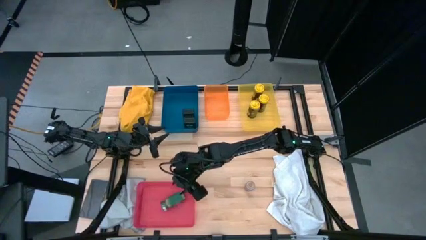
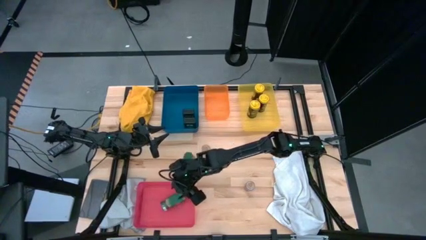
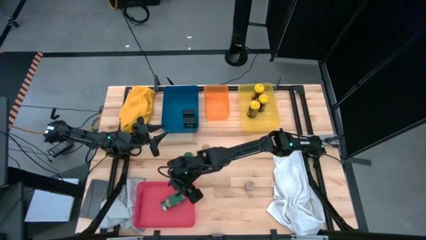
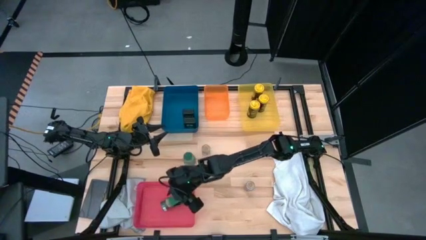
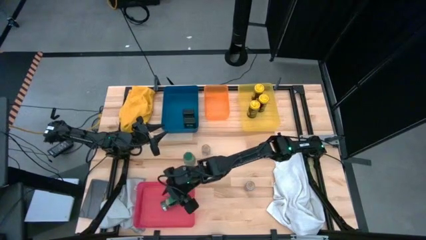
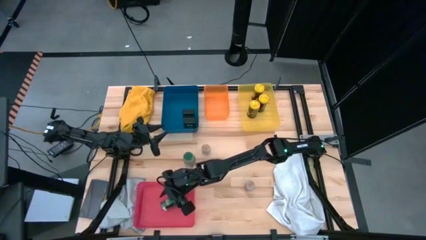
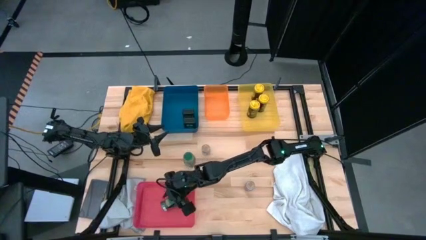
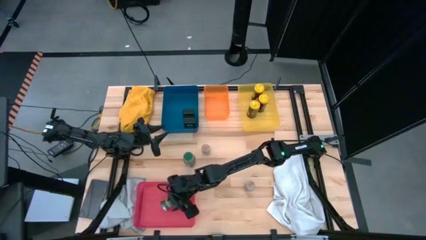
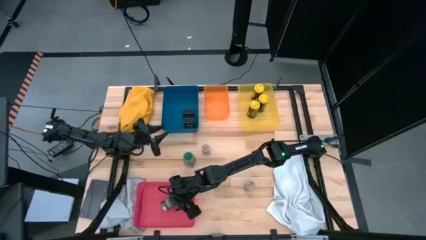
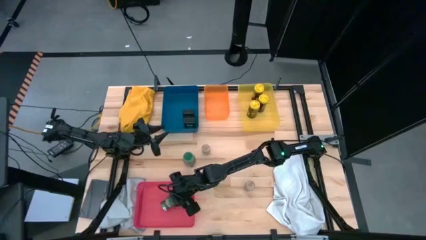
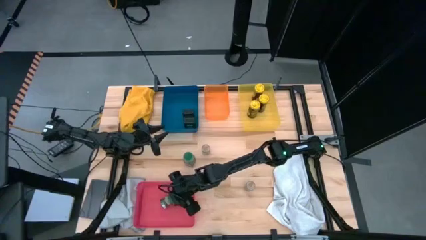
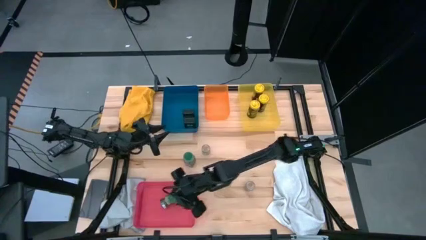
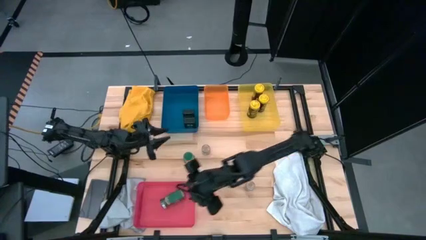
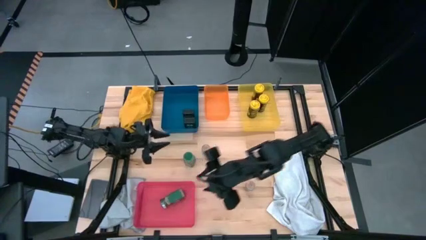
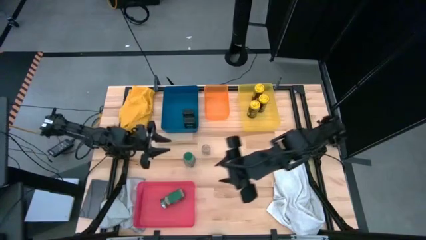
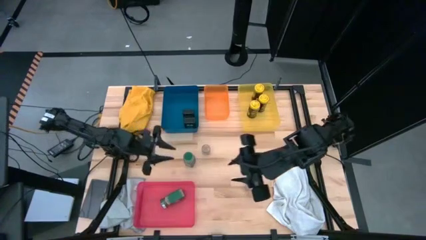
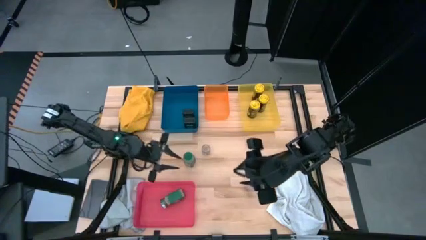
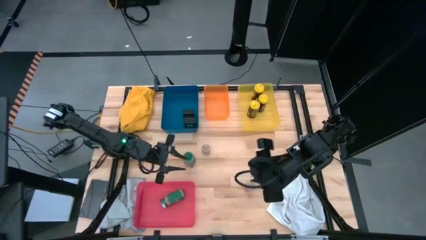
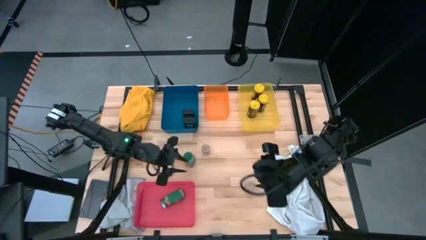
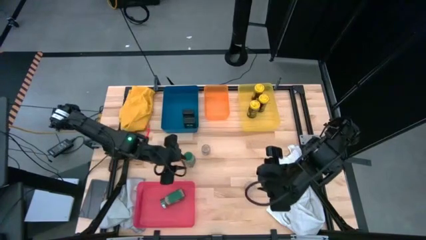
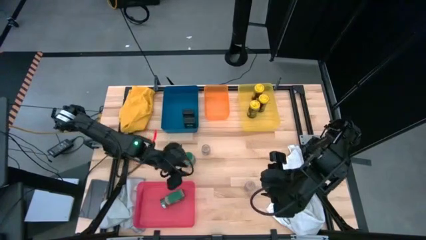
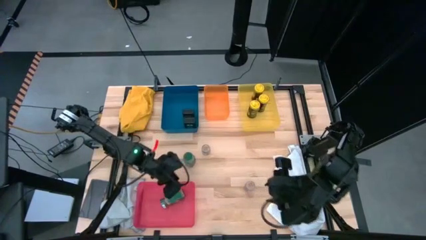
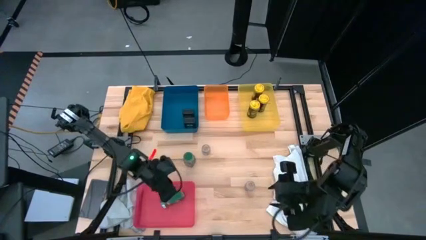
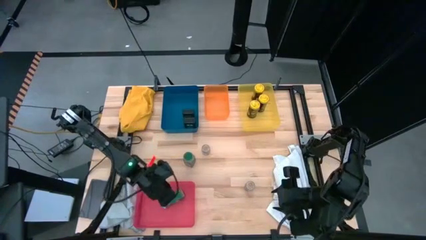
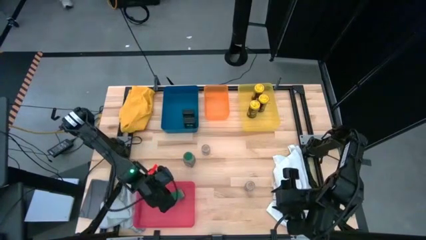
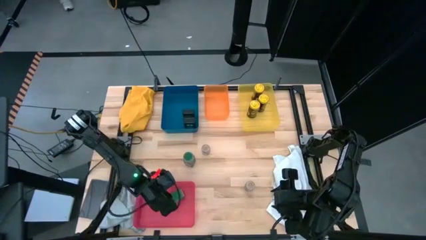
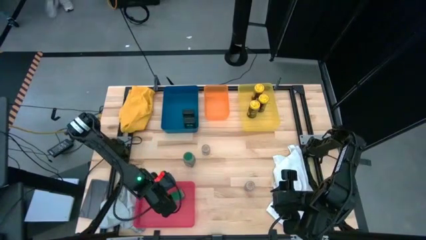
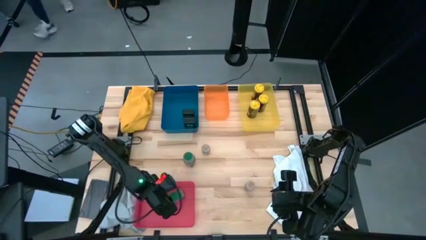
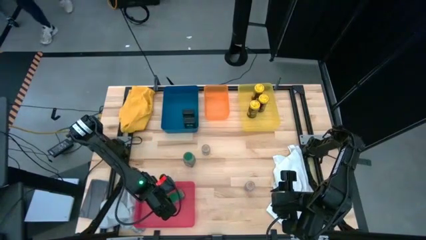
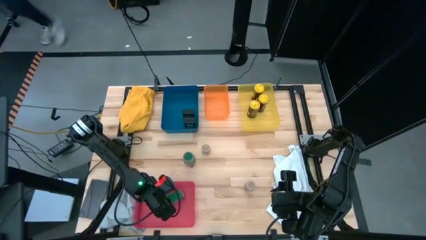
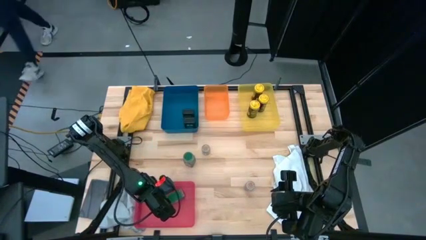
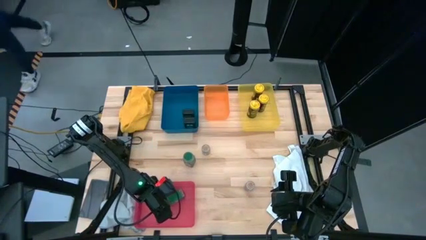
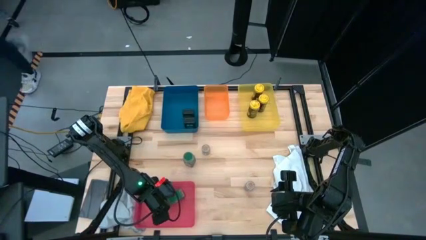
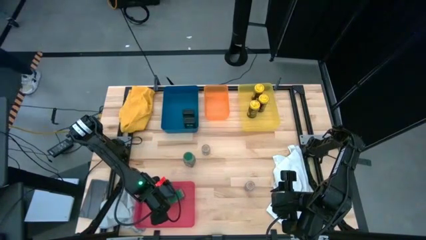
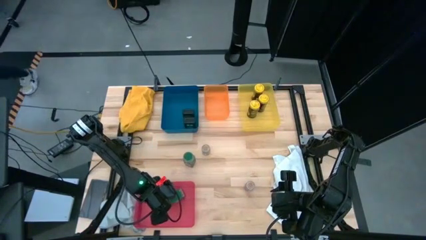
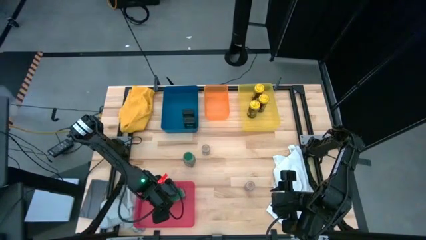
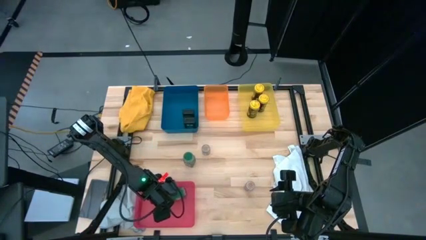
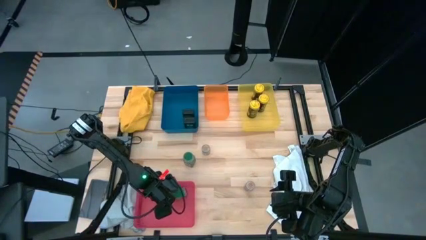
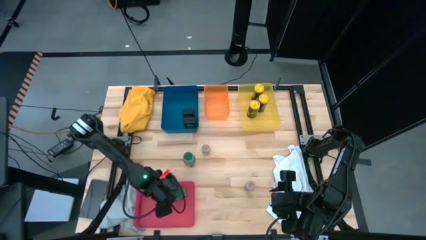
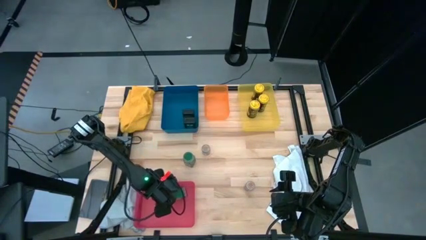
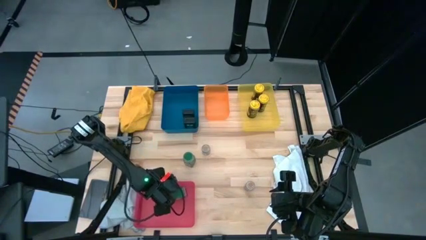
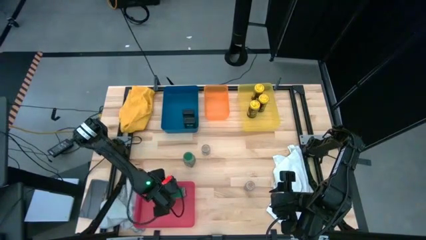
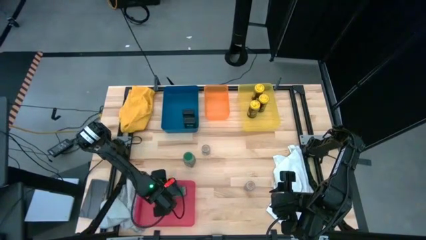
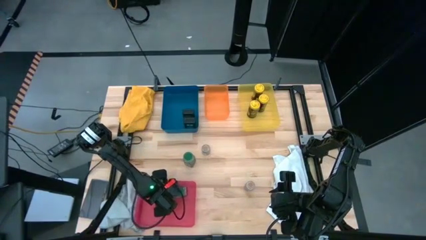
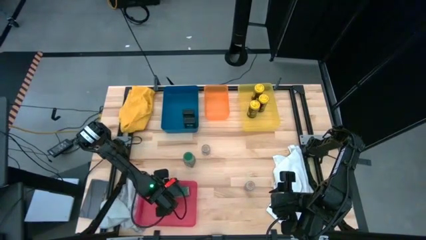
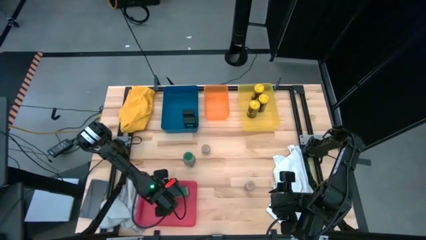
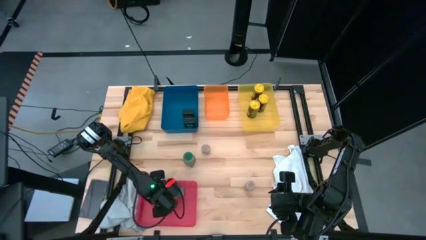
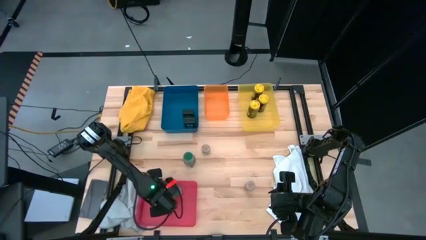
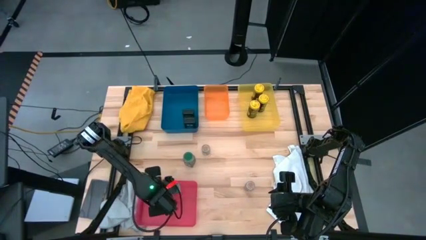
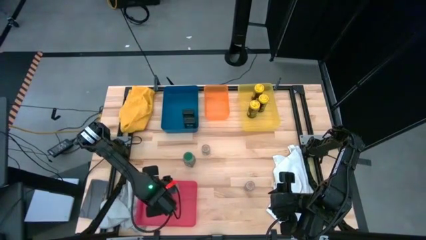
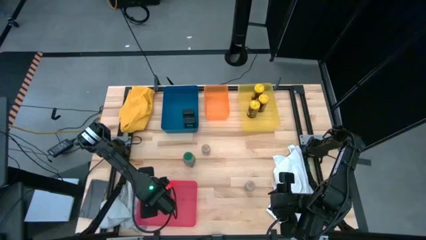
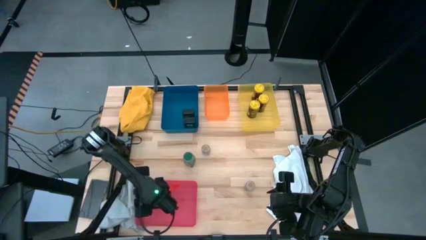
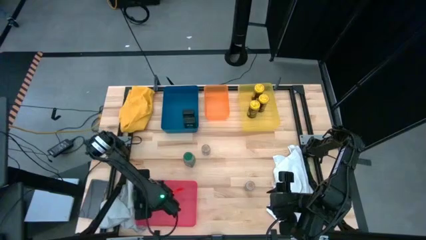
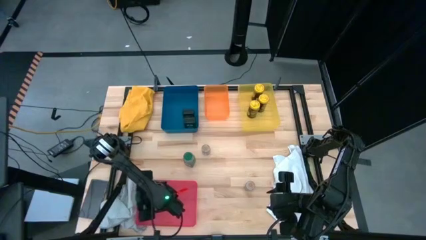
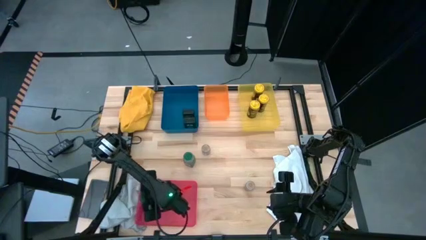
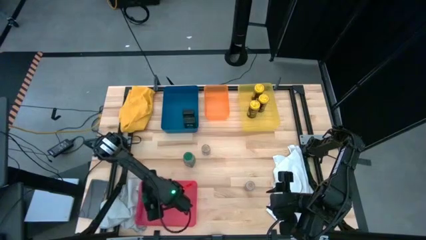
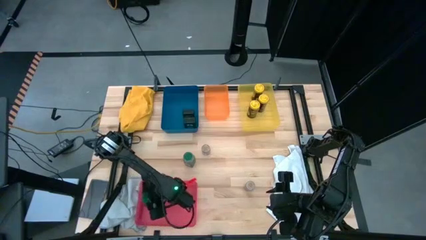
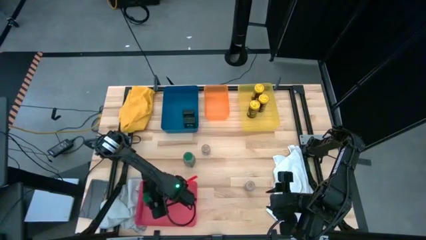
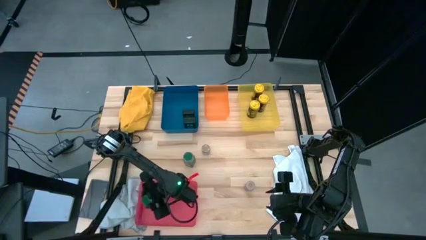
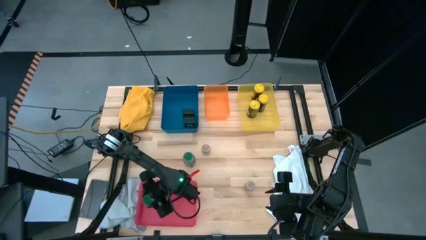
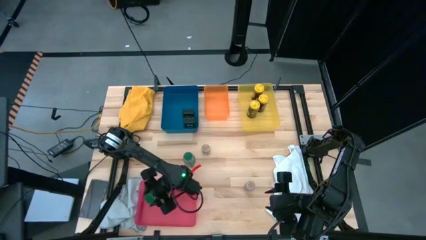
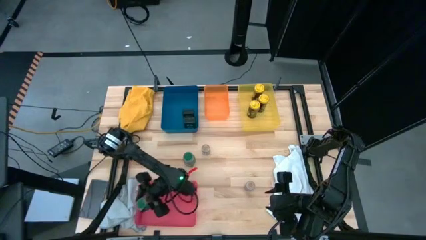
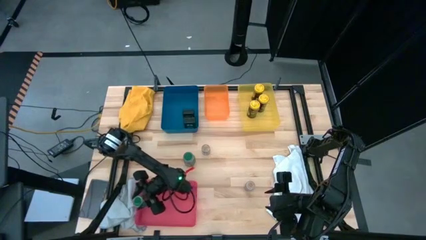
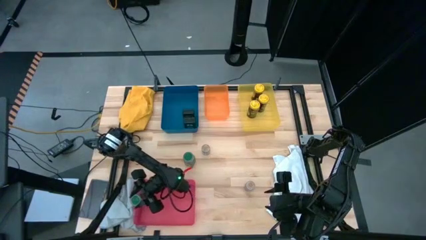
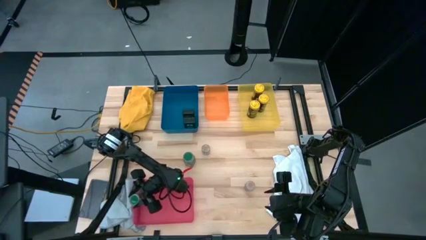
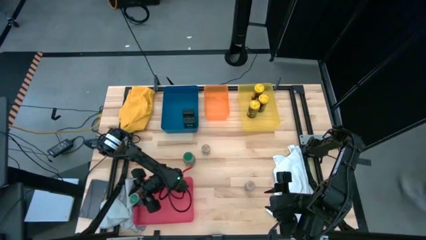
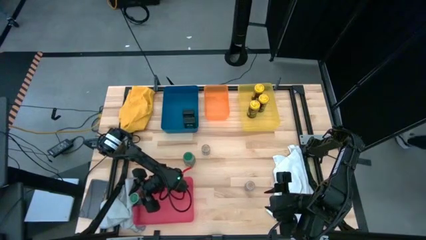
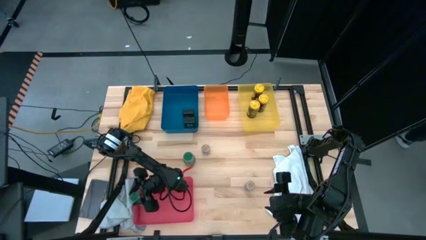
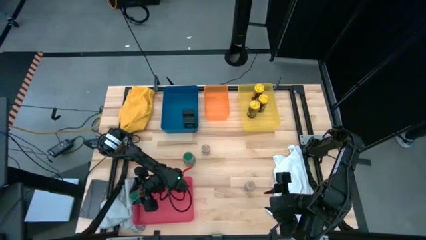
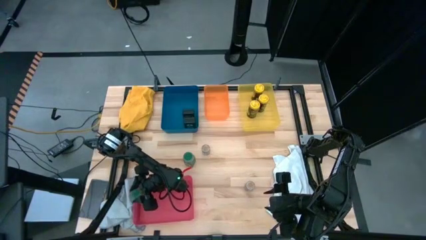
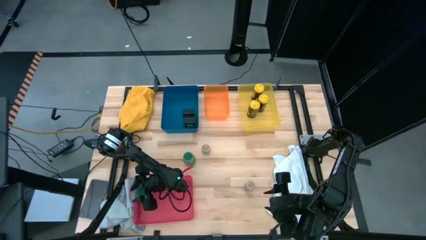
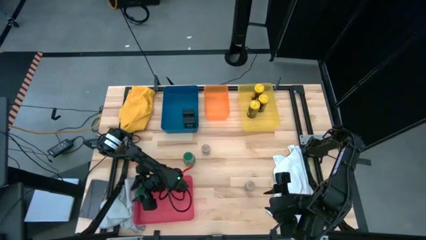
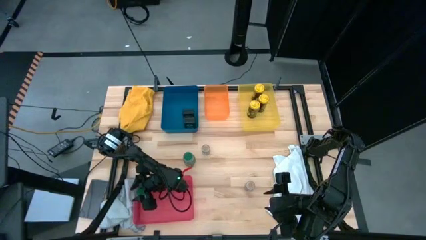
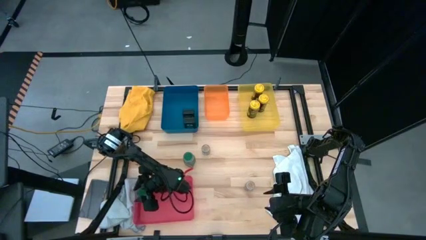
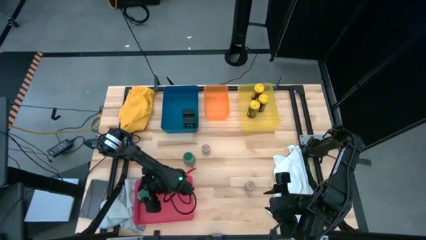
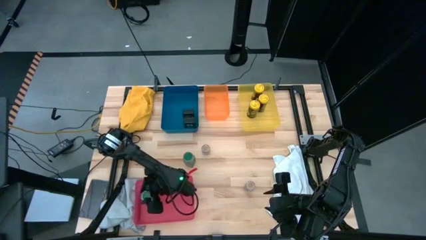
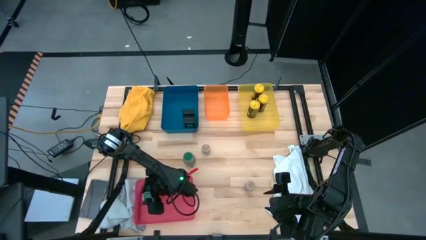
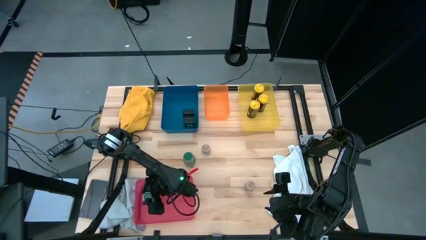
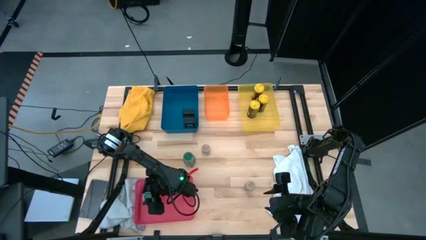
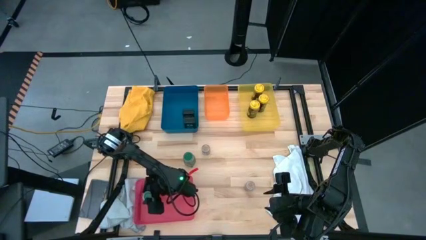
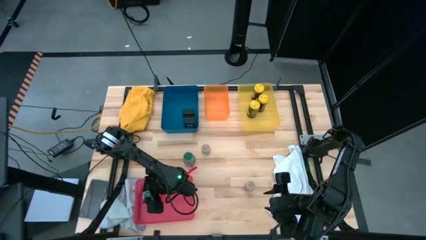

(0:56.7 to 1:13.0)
Task: Sort spices by type
Adjust the green seasoning bottle in the red bin
